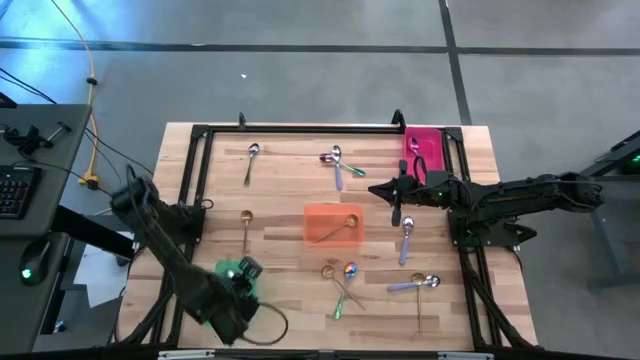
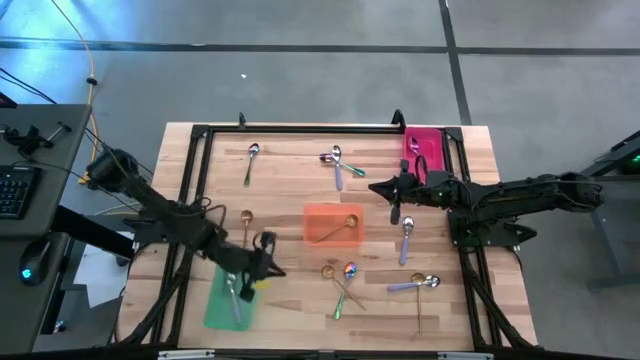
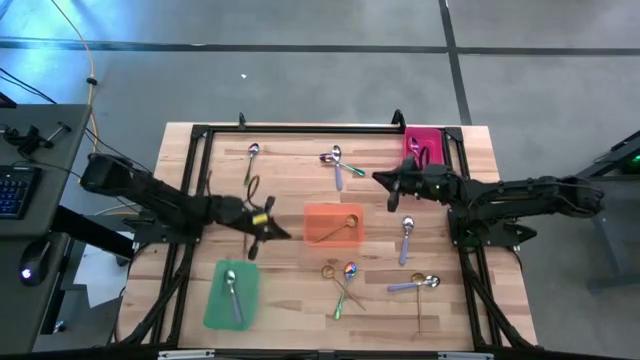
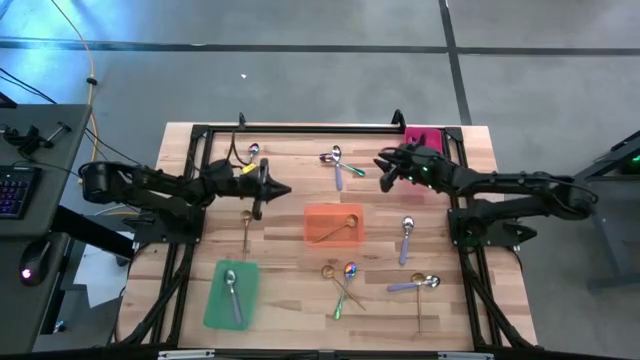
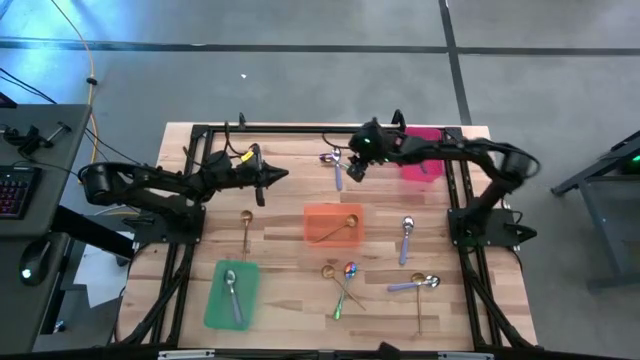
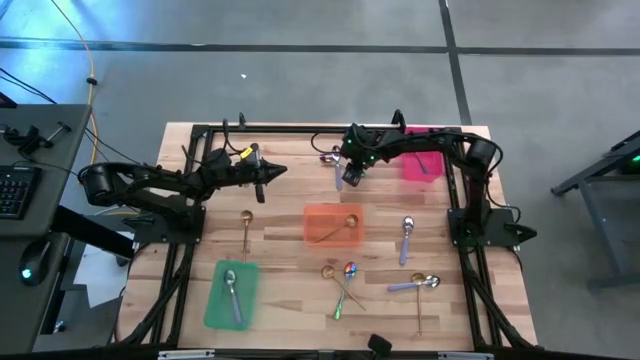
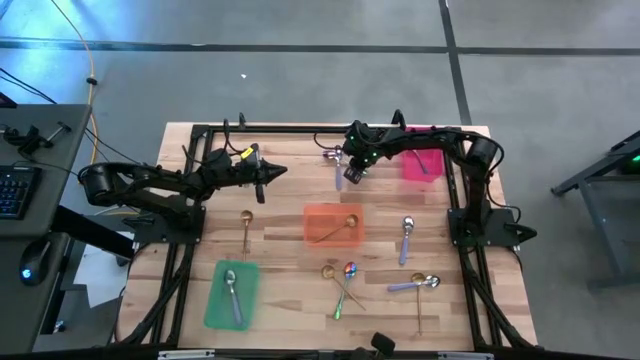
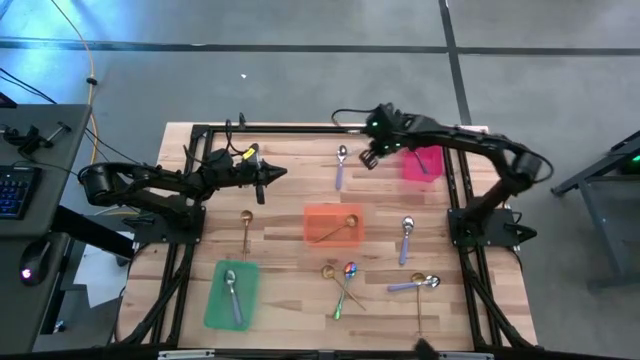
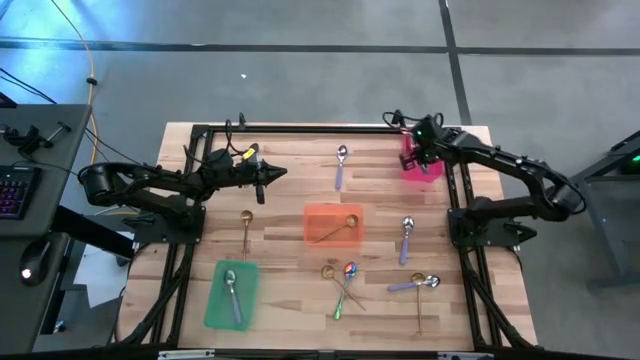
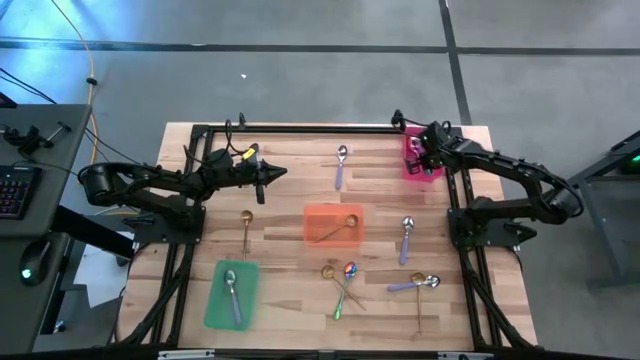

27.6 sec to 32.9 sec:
Task: Sort silverware by color (type)
Put the top right multicolored spoon into the red bin

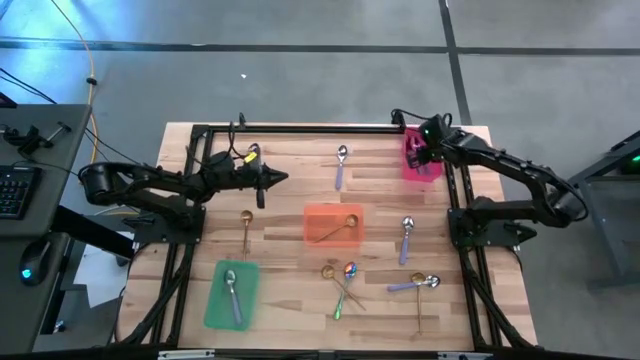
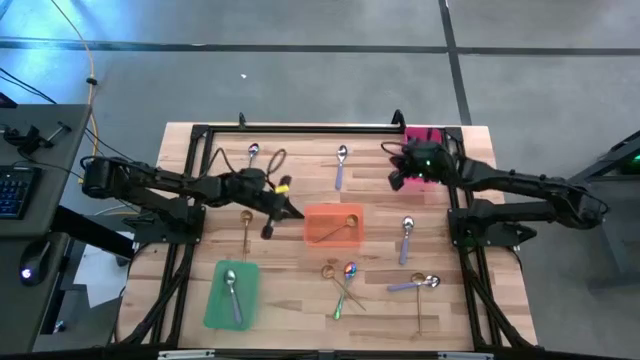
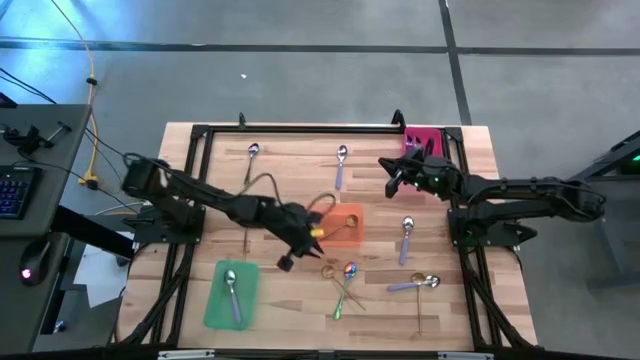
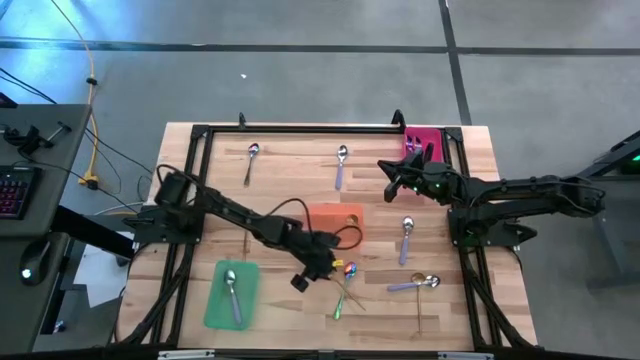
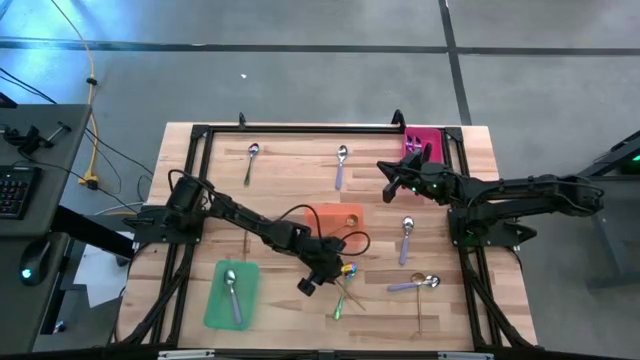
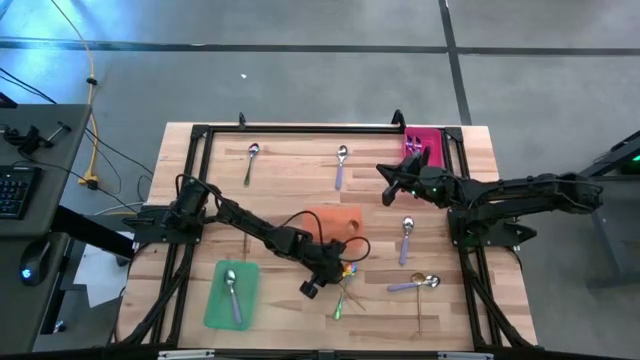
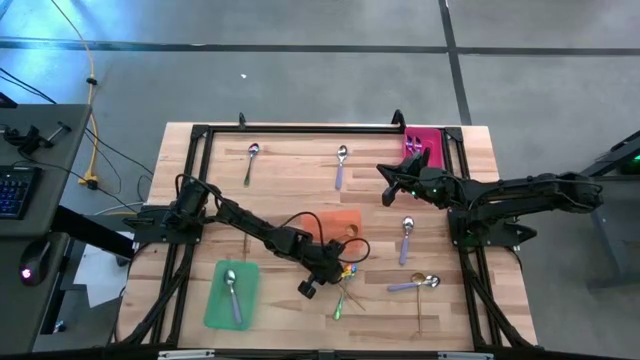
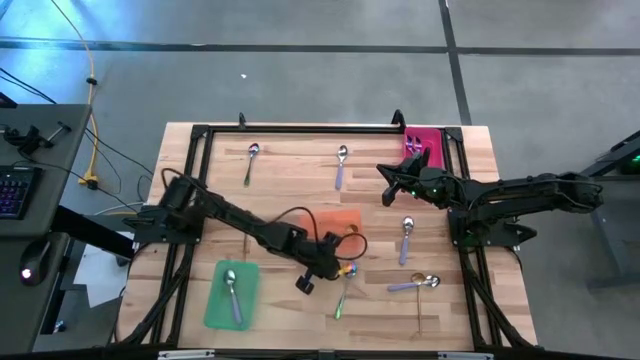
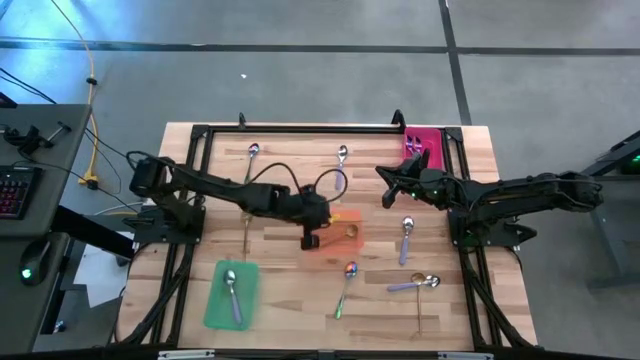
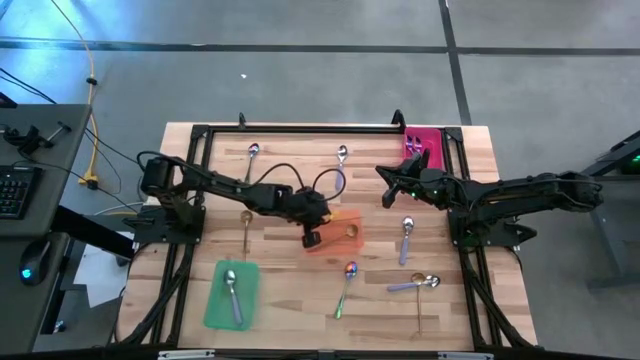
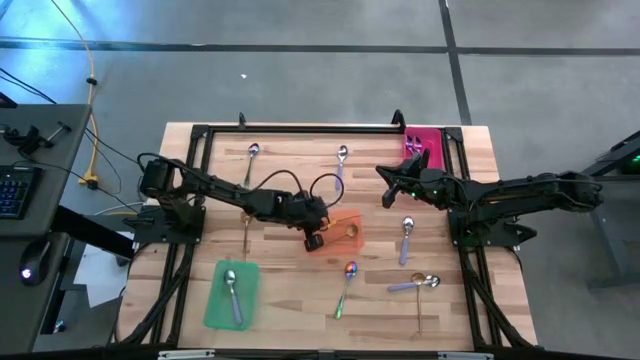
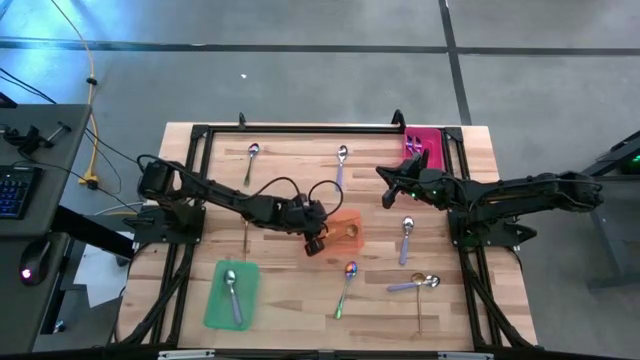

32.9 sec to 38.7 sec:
Put the bottom left gold spoon into the orange bin

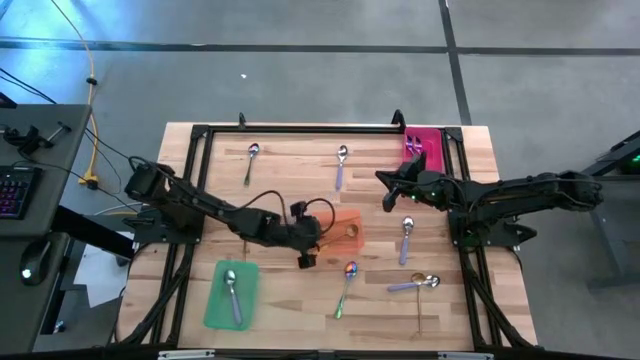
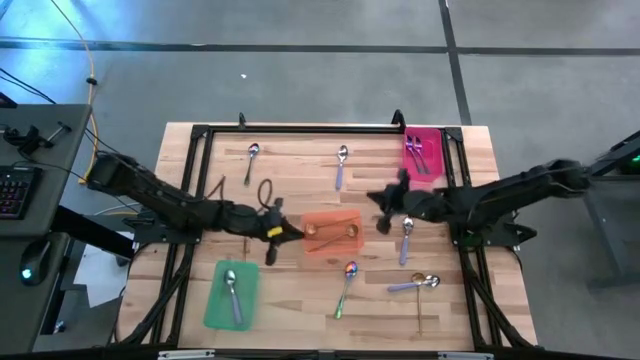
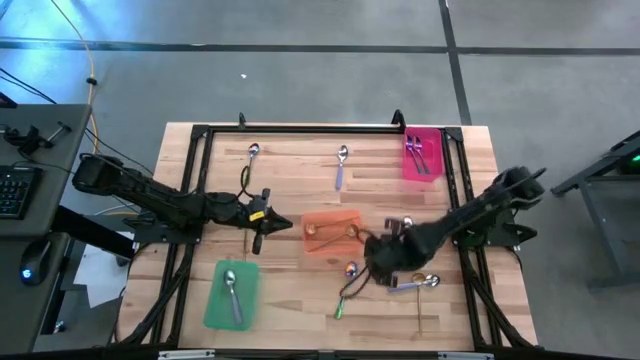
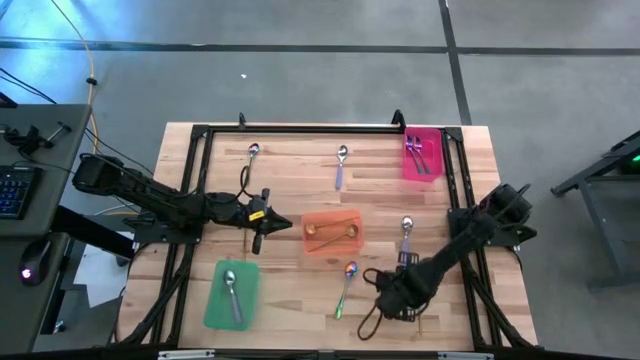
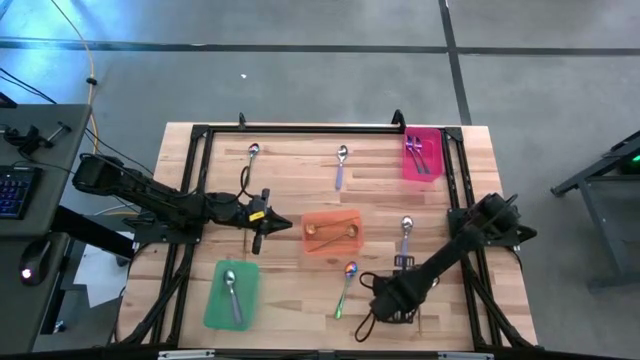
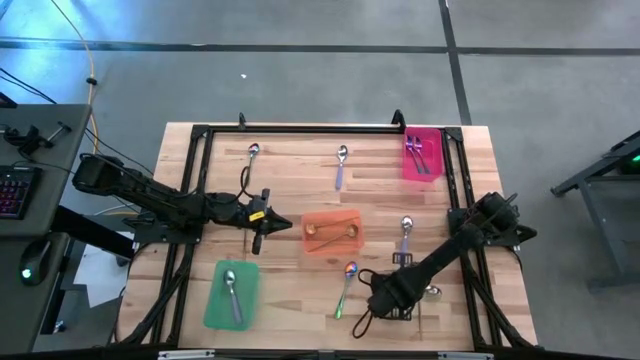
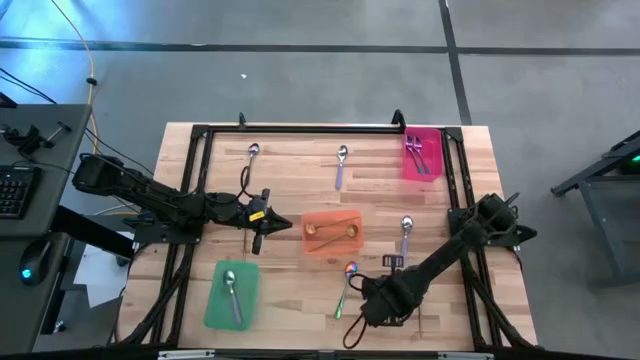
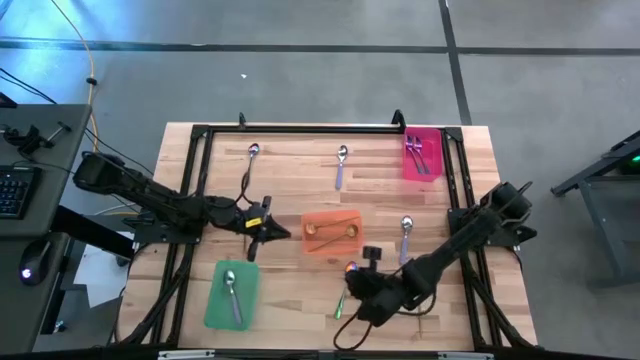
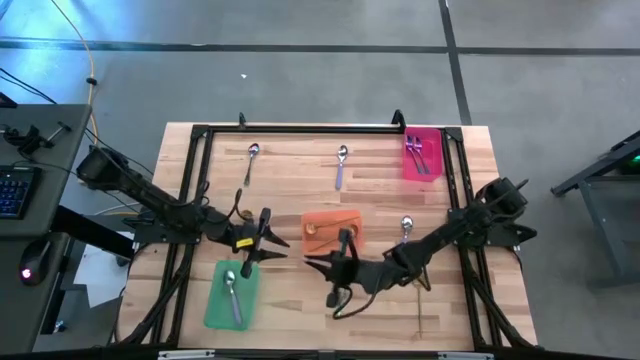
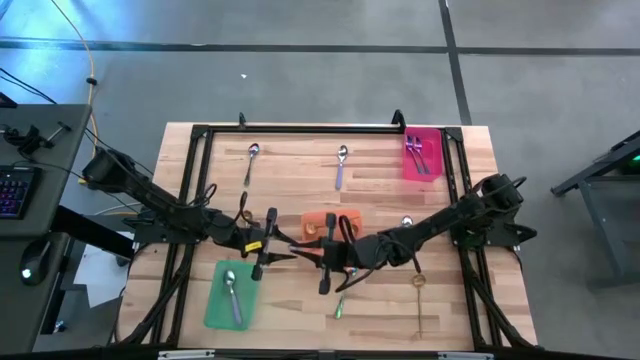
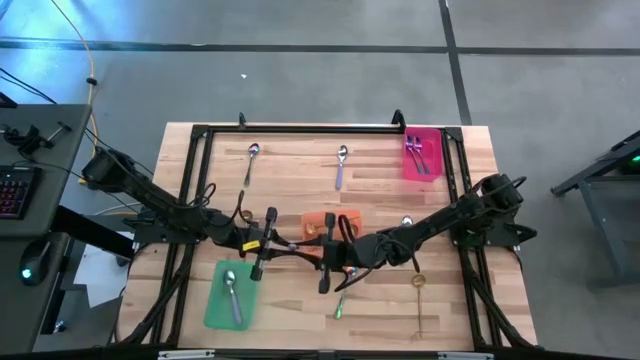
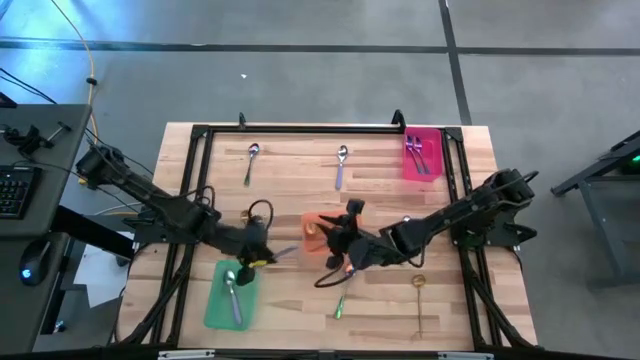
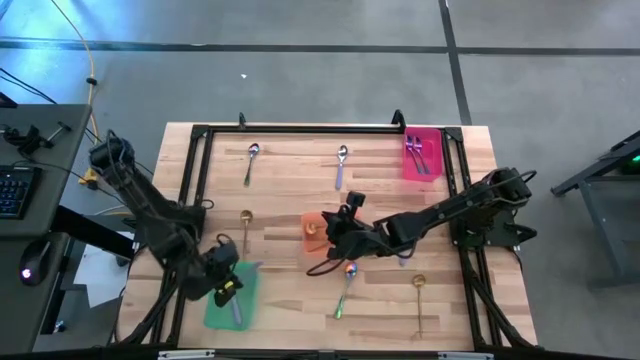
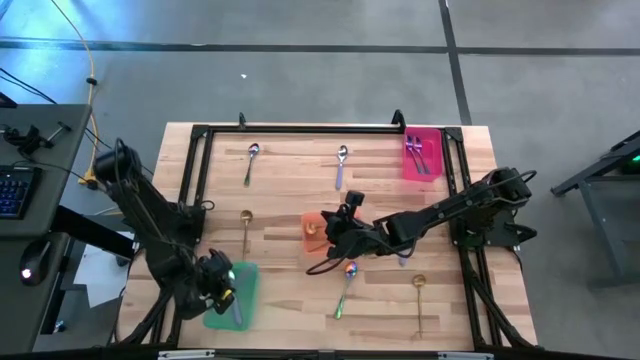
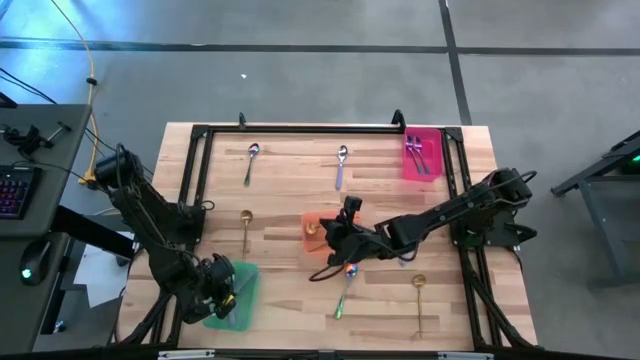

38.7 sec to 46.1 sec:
Put the bottom violet spoon into the green bin

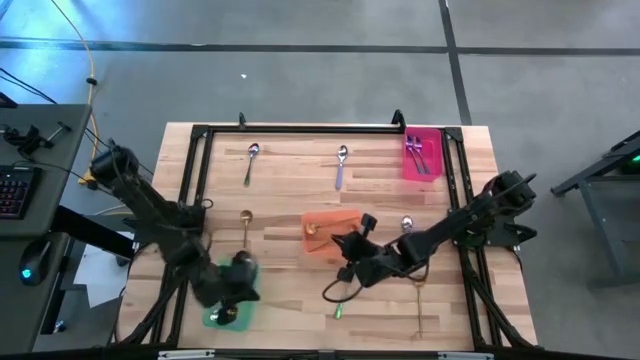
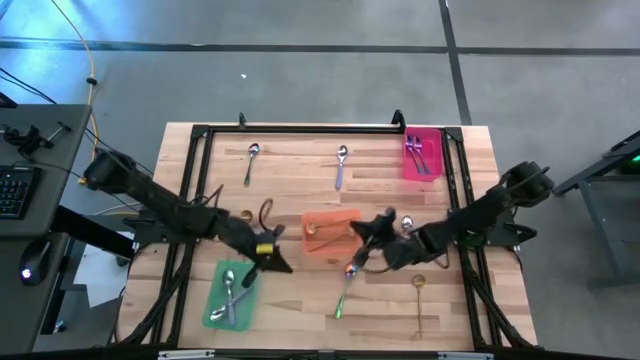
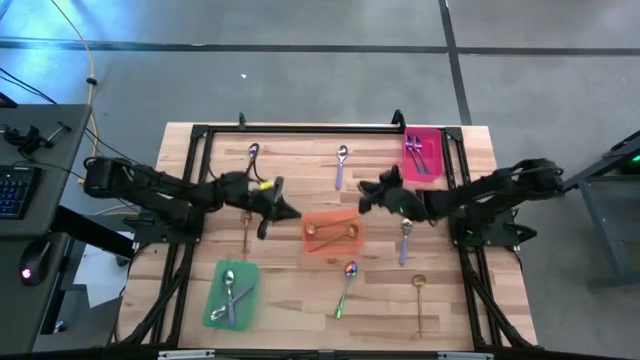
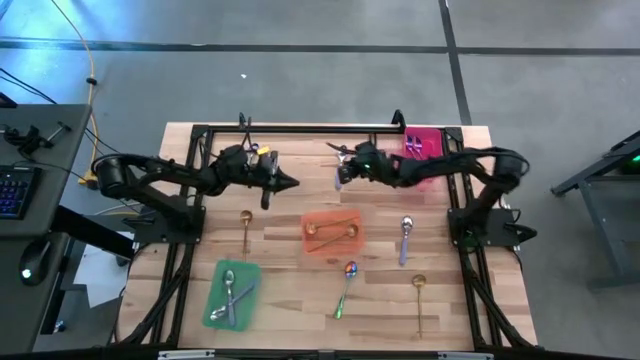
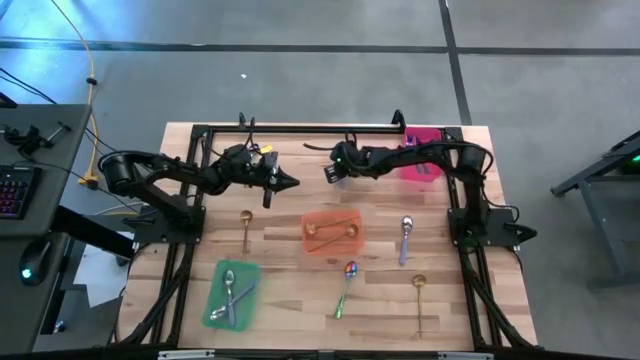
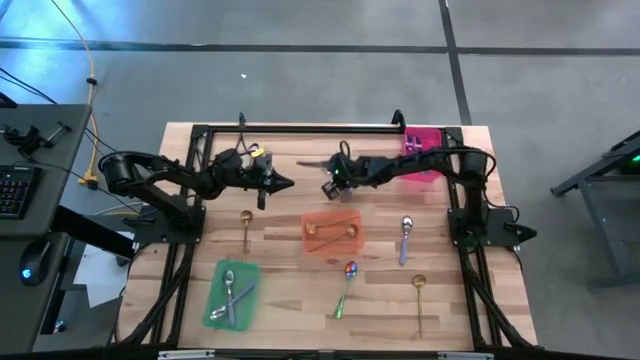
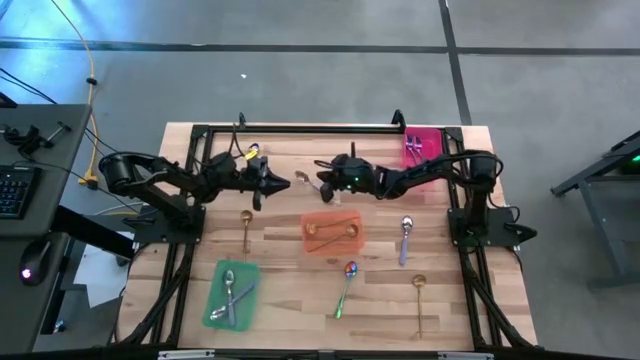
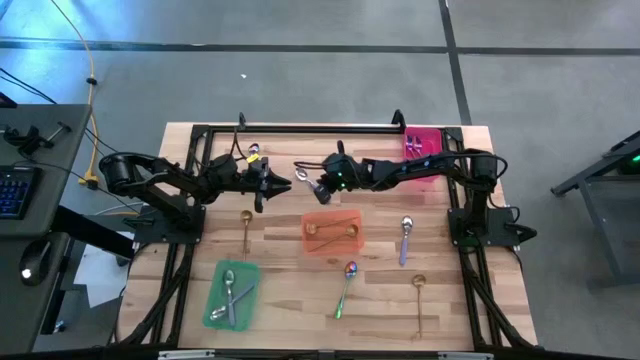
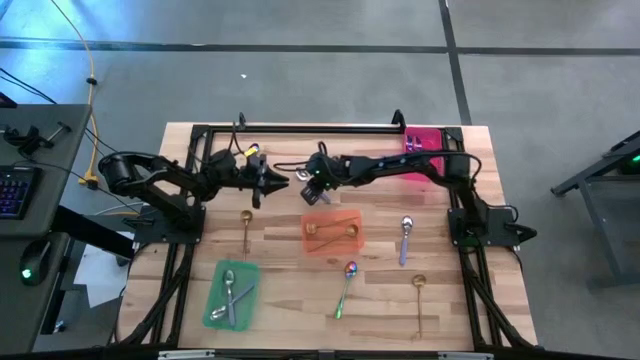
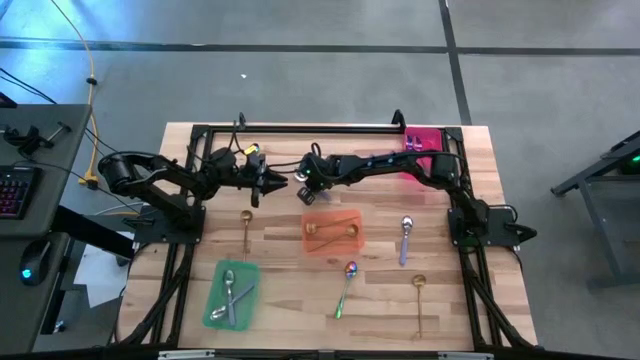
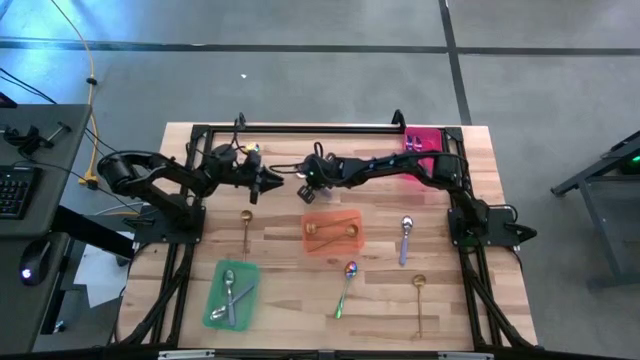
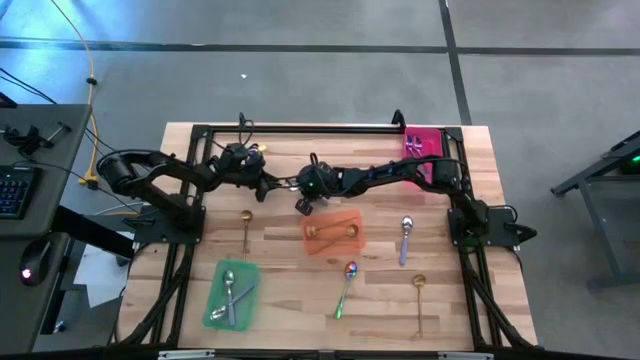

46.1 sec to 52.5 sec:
Put the top violet spoon into the green bin
